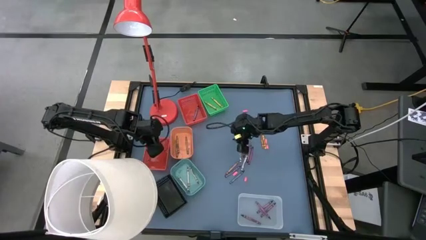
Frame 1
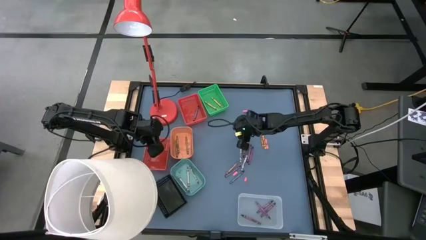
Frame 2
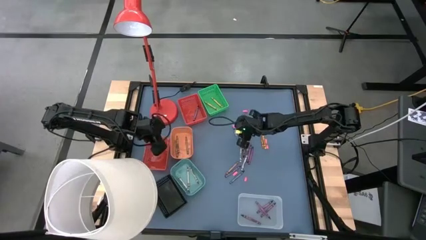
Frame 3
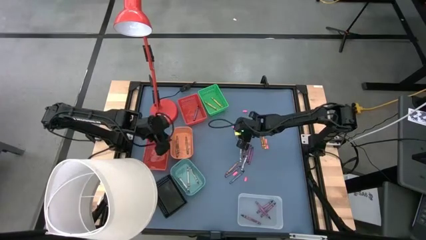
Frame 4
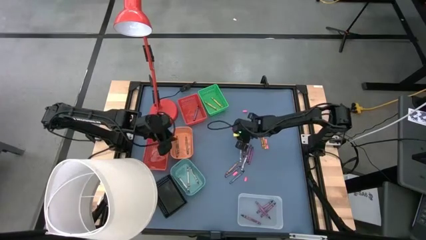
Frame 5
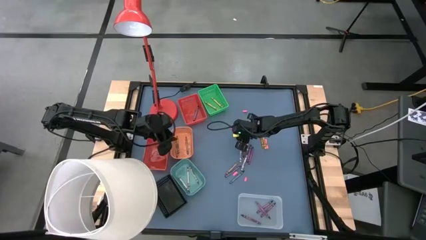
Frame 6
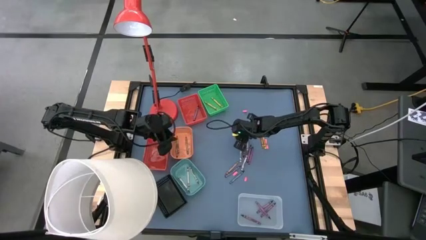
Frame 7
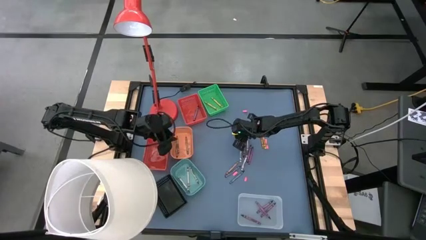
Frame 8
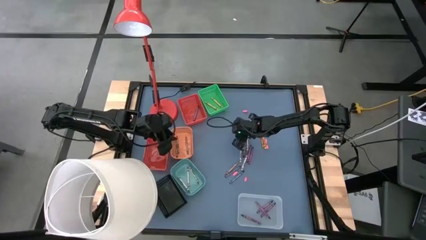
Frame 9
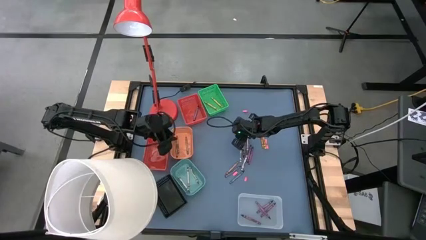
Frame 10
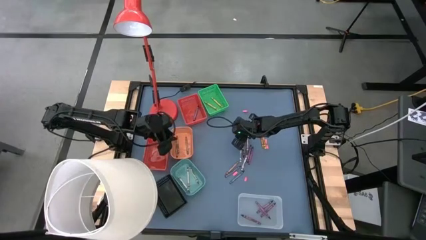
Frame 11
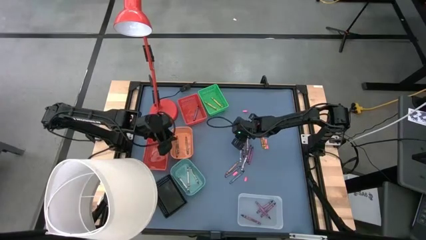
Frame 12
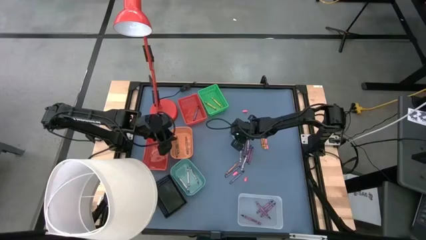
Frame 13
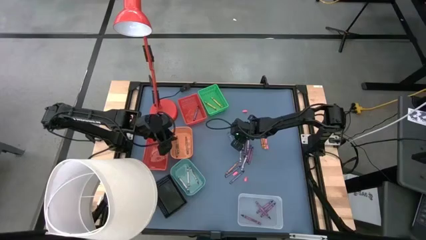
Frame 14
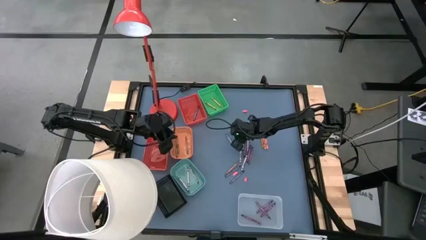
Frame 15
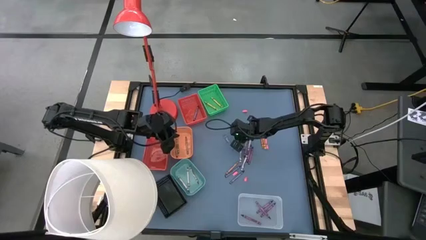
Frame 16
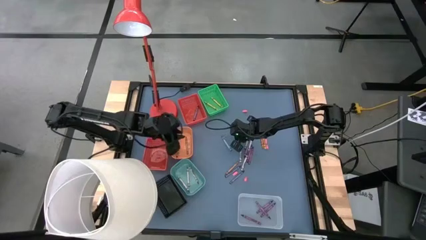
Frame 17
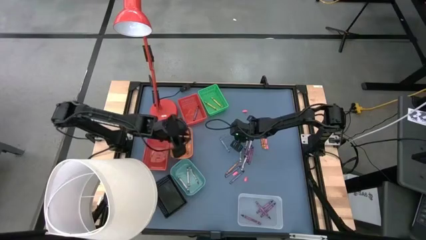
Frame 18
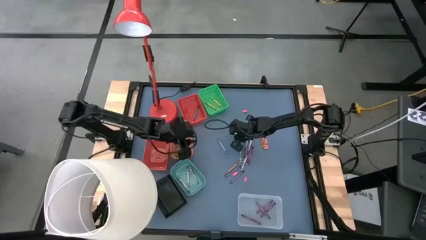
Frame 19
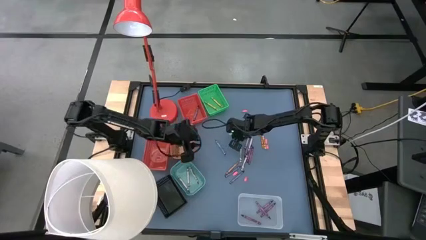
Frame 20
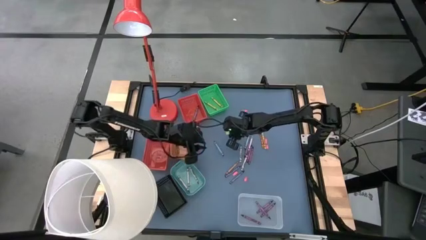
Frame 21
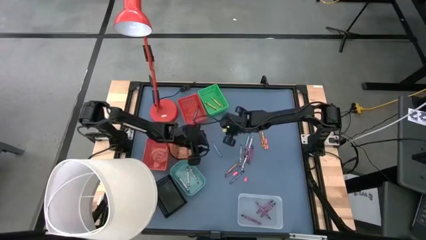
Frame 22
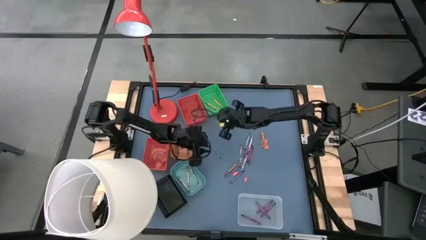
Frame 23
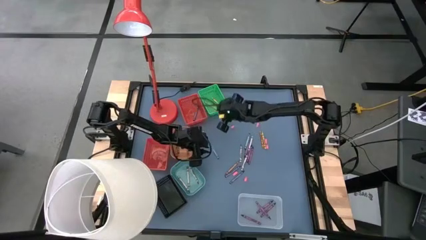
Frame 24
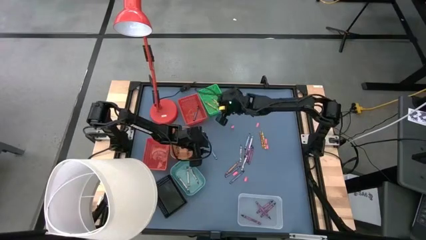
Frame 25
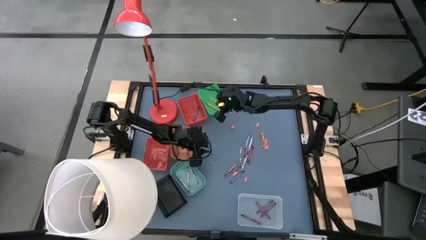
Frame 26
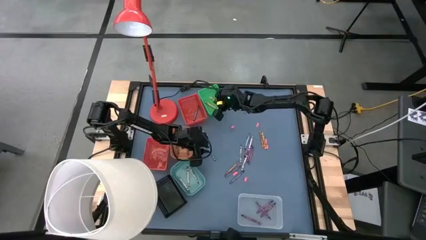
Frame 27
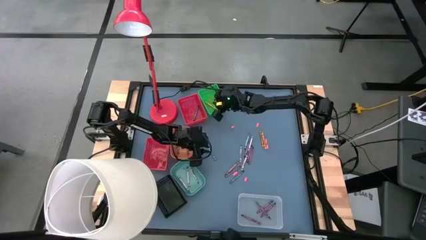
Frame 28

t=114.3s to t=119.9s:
Task: Sort crayons
Put the yellow crayon into the green basket

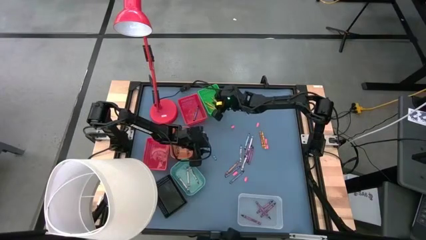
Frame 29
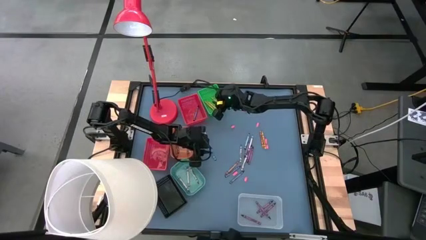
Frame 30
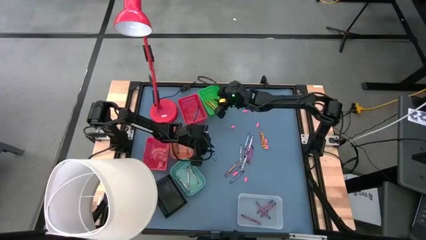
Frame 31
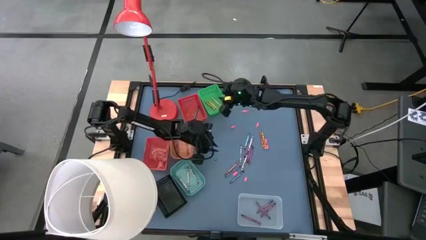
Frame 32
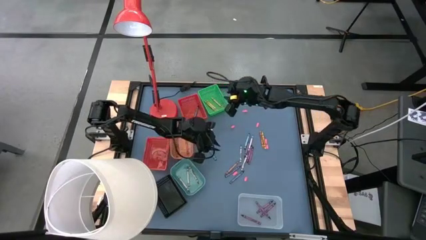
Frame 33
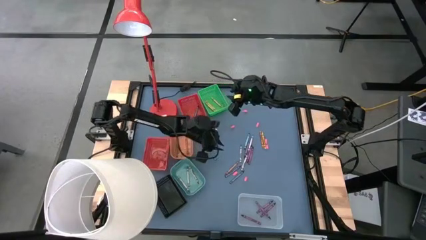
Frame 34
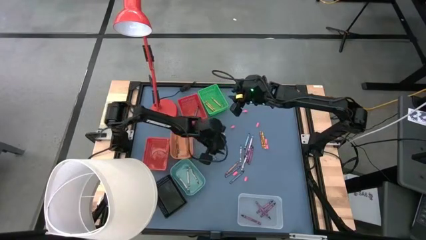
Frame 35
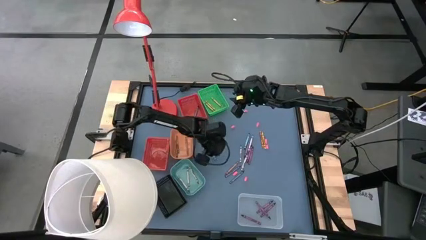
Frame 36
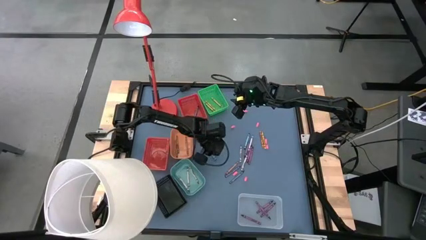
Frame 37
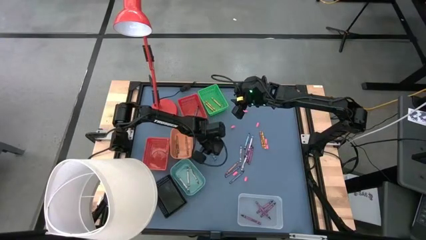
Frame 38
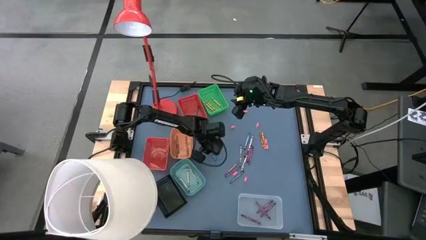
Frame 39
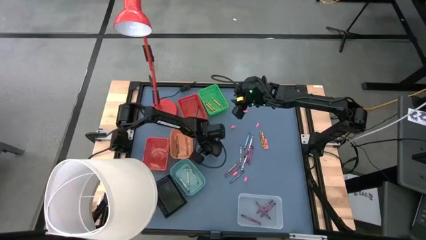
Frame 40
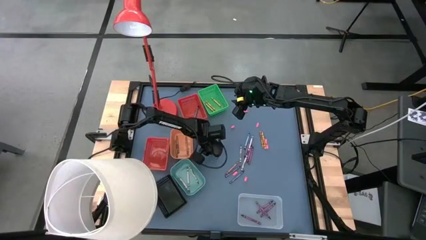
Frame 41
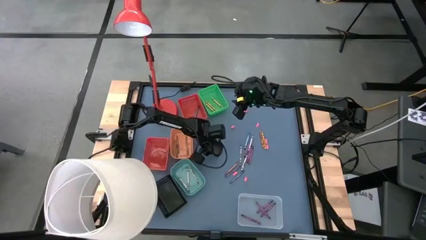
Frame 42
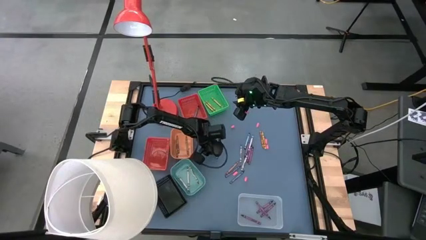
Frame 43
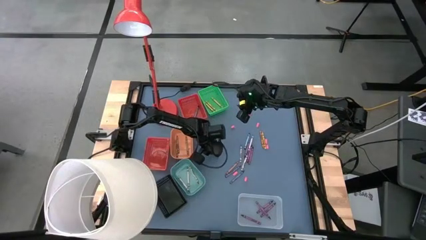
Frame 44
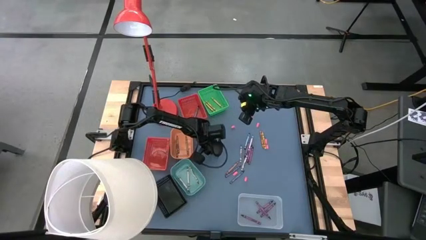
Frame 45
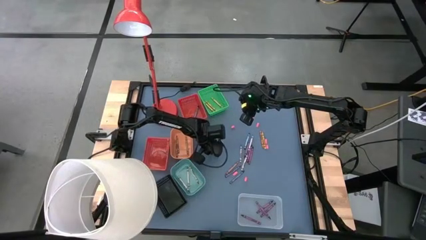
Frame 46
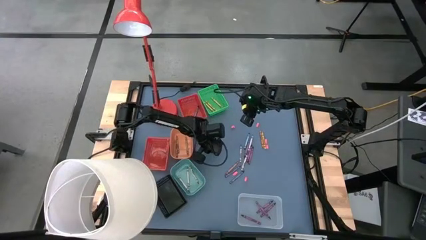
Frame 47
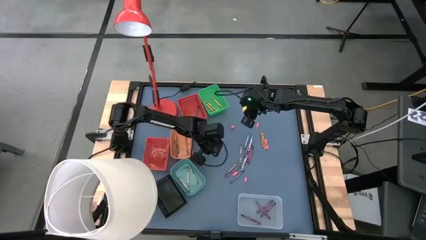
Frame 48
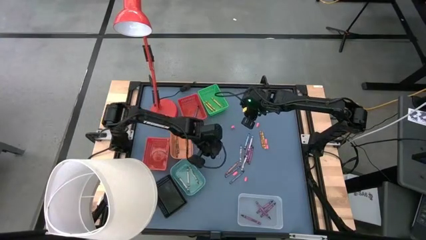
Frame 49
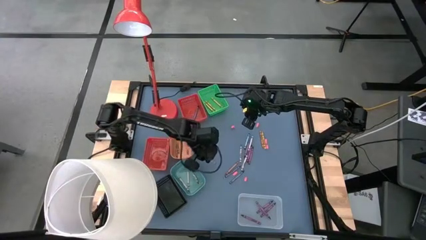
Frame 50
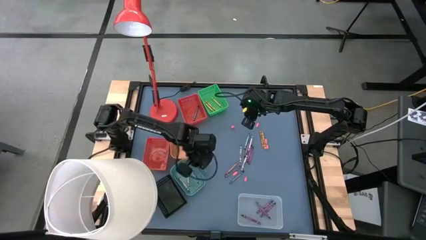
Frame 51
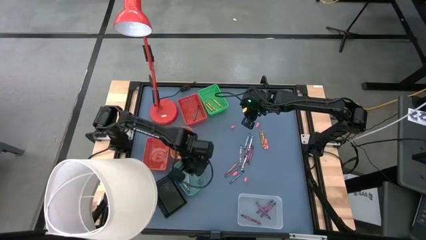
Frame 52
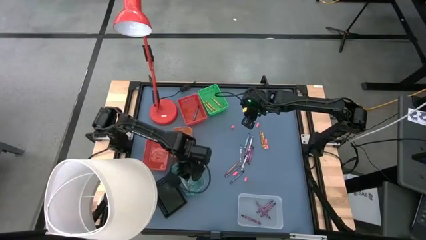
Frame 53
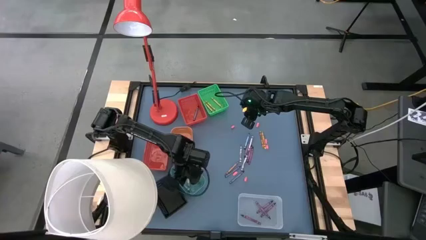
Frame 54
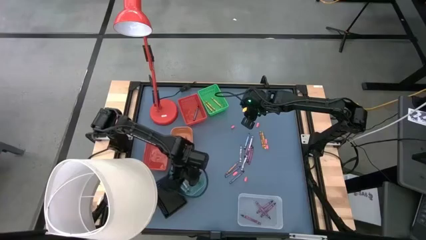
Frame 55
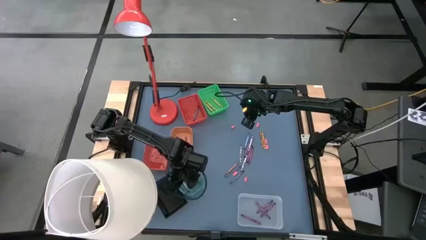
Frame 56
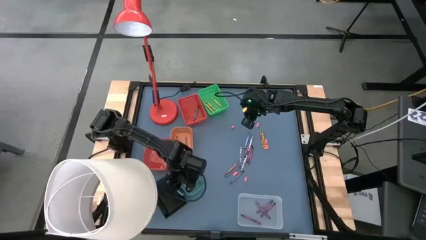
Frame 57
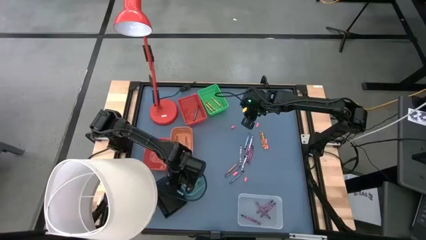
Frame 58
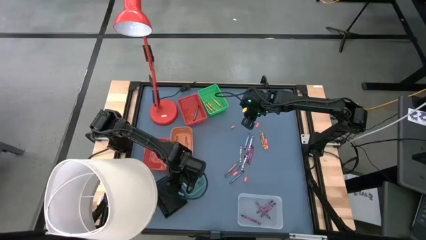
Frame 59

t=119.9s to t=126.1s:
Put the light blue crayon into the black basket

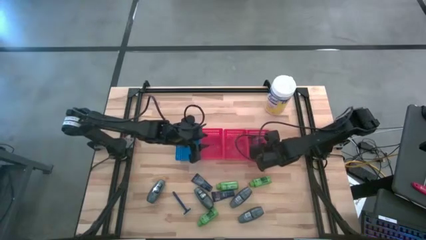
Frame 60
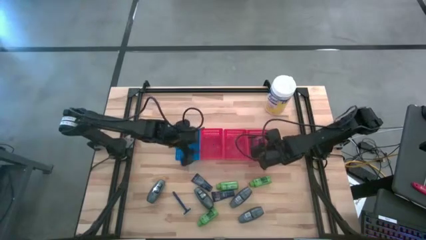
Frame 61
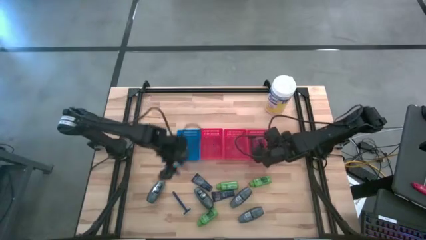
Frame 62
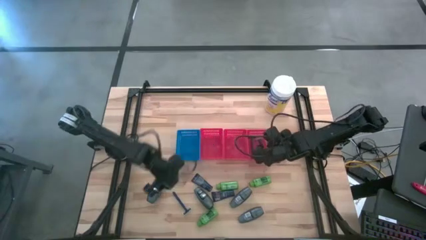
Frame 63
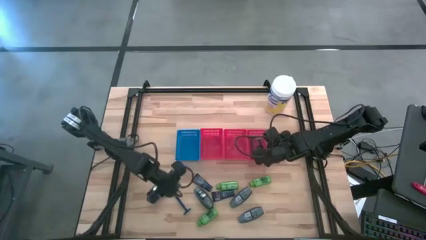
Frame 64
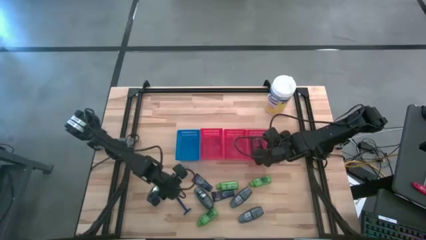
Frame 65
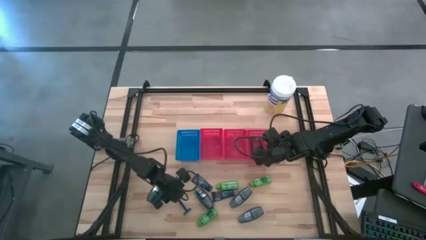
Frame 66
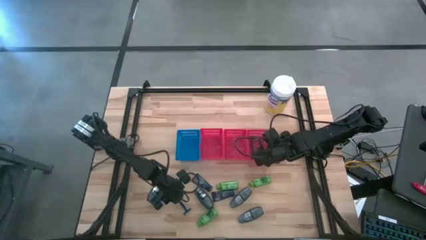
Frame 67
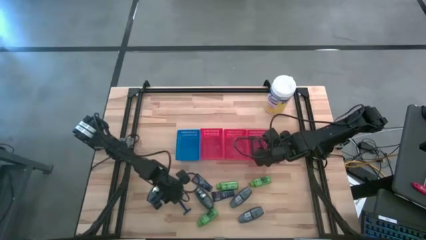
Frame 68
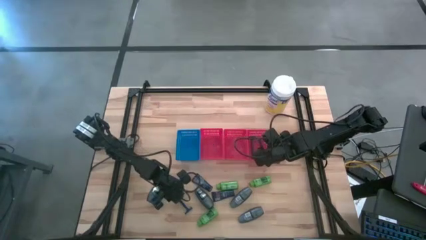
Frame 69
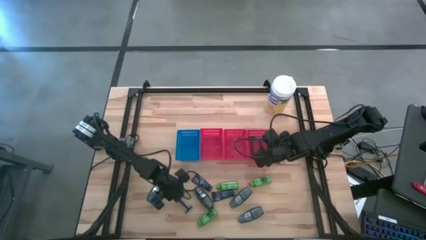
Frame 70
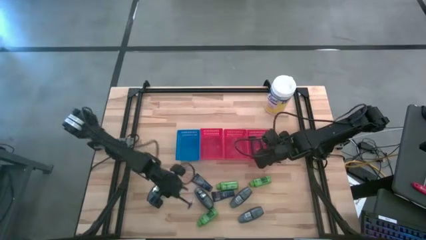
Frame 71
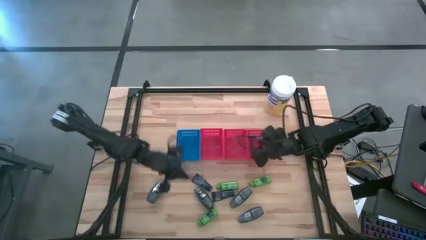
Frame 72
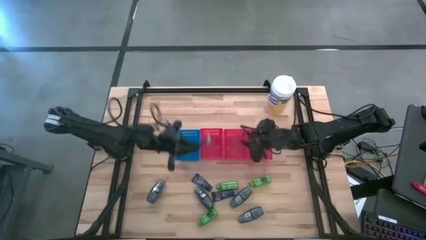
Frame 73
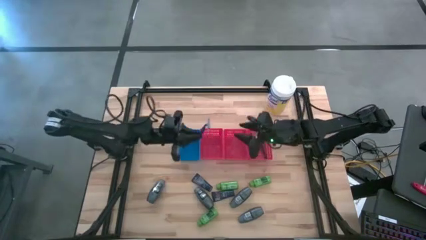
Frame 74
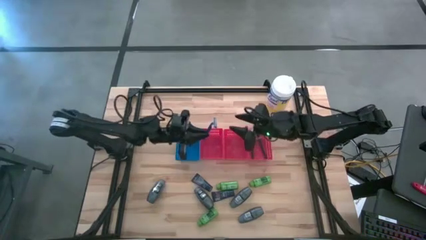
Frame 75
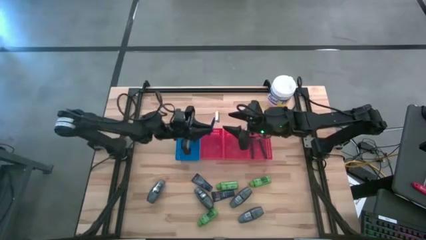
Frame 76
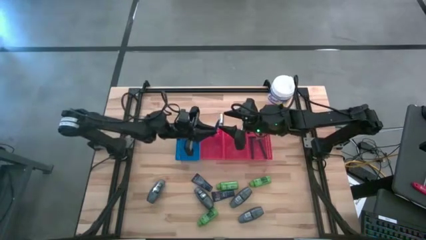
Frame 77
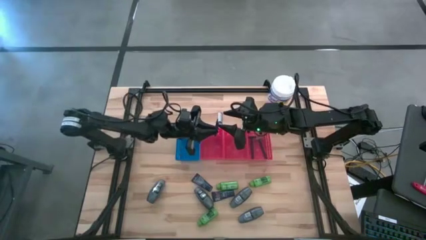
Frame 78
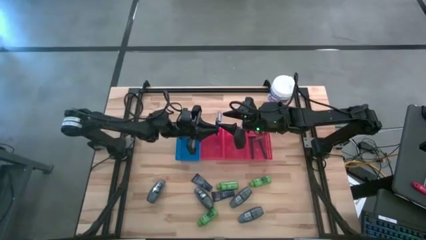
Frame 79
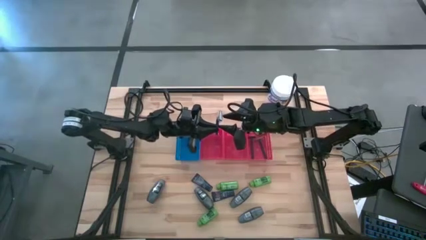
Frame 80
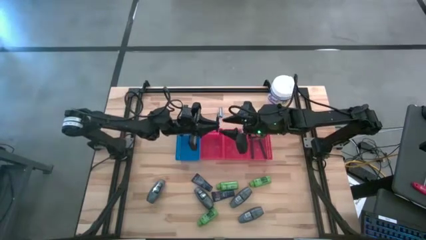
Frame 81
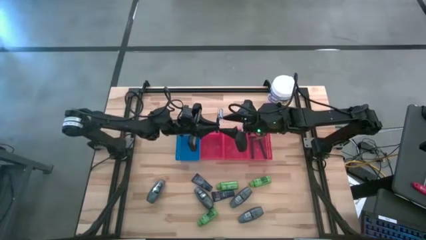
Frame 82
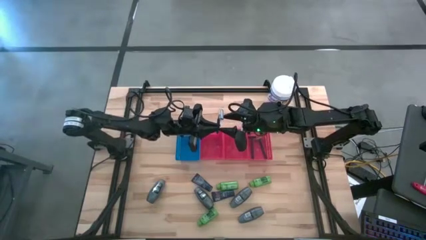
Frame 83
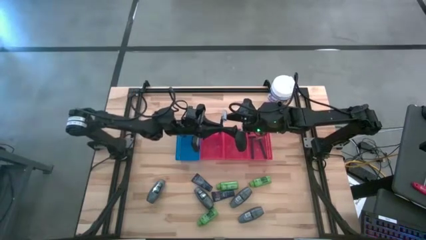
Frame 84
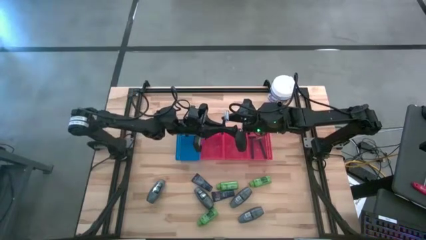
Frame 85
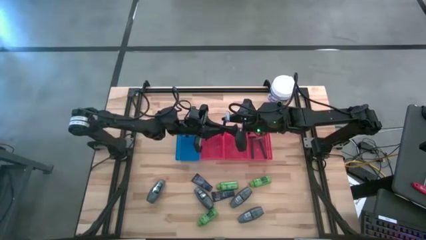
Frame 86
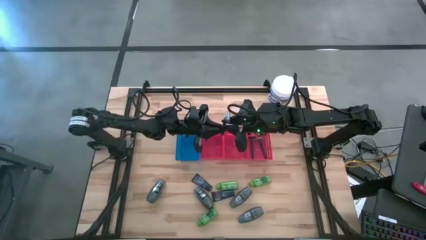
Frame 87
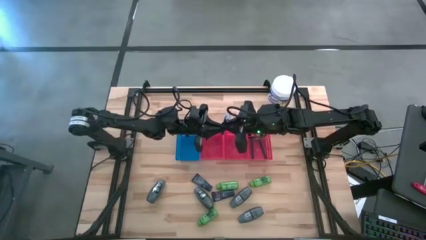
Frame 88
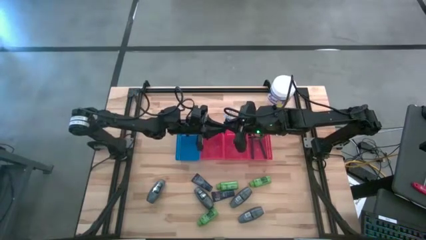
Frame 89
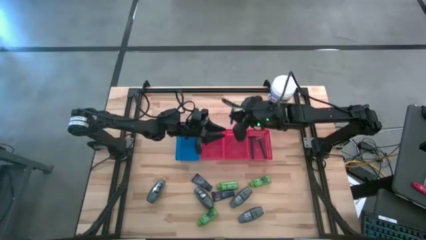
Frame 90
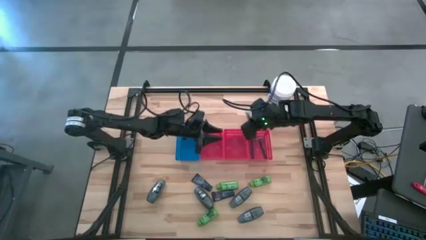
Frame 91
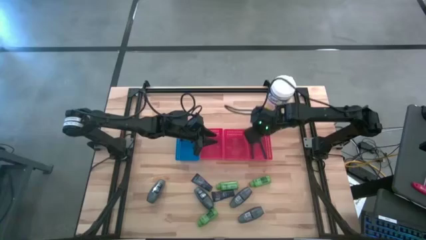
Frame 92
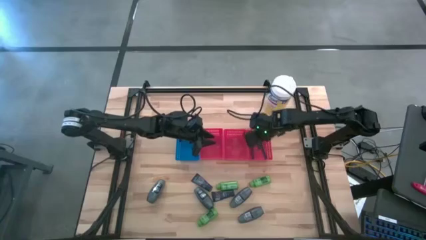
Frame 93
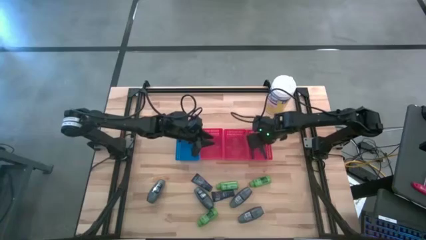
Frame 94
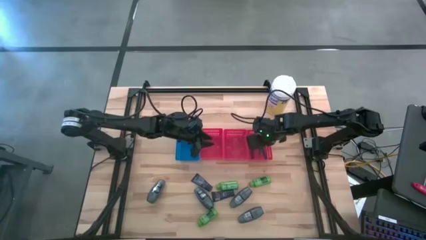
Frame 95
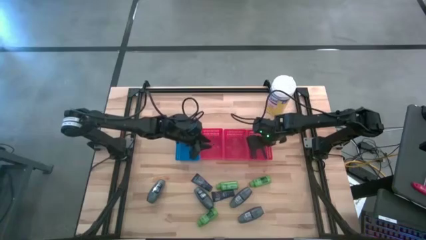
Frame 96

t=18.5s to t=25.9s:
Task: Pick & Place Travel size toiletries
Put the blue razor into the right red bin
